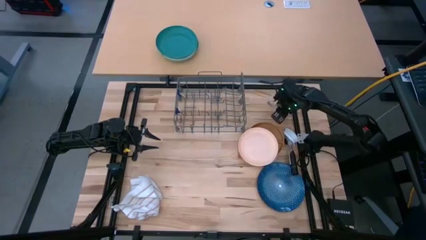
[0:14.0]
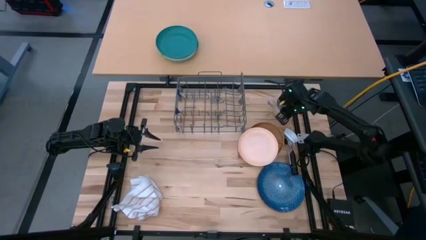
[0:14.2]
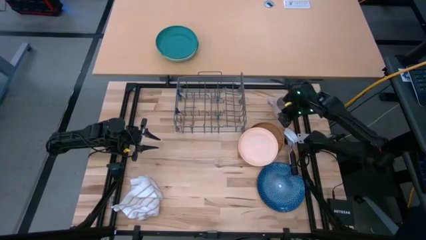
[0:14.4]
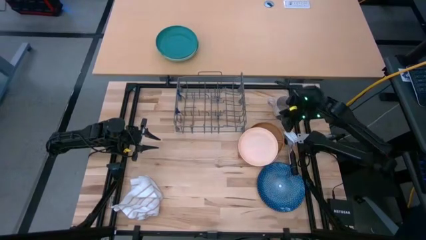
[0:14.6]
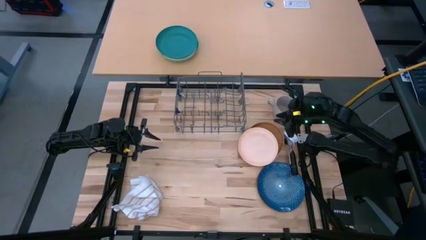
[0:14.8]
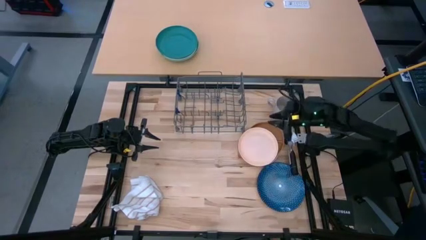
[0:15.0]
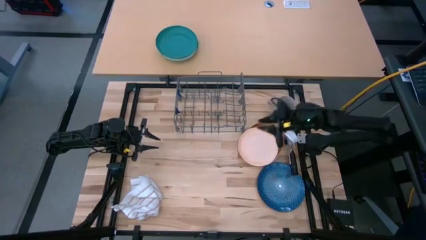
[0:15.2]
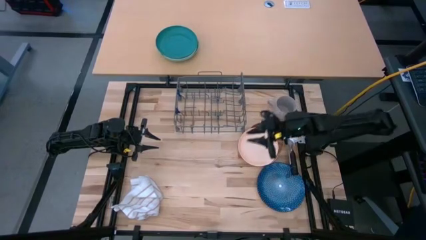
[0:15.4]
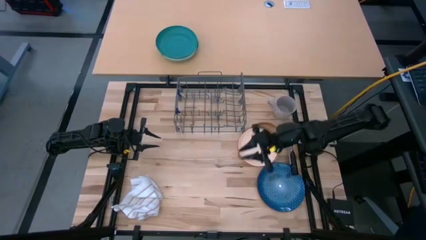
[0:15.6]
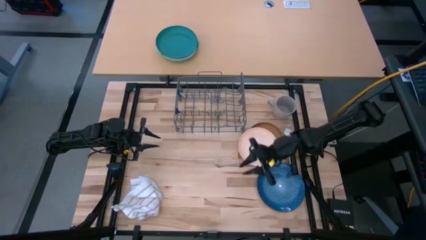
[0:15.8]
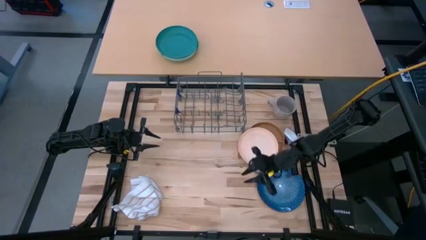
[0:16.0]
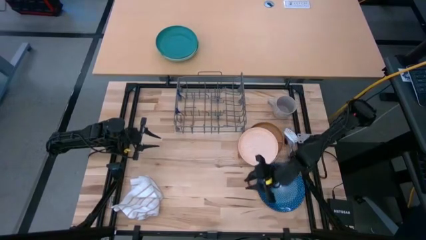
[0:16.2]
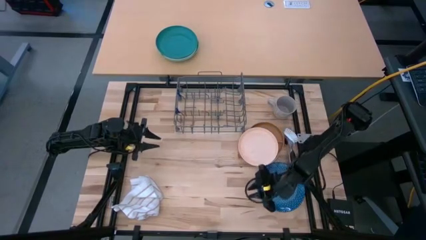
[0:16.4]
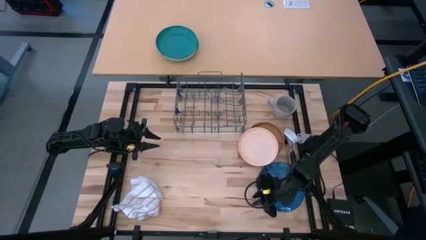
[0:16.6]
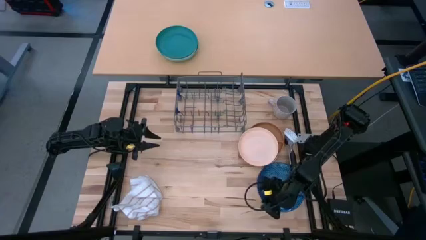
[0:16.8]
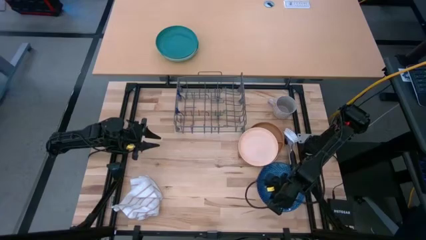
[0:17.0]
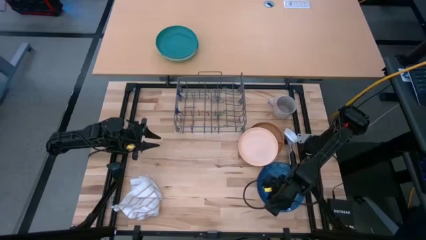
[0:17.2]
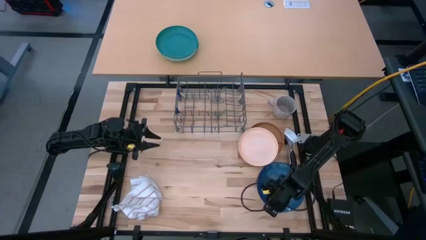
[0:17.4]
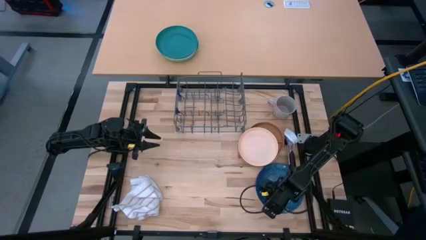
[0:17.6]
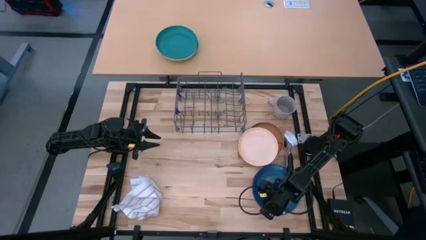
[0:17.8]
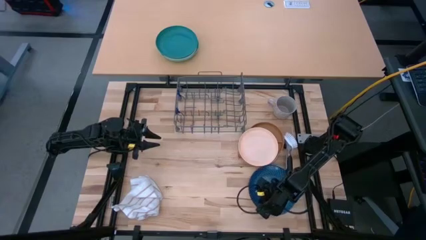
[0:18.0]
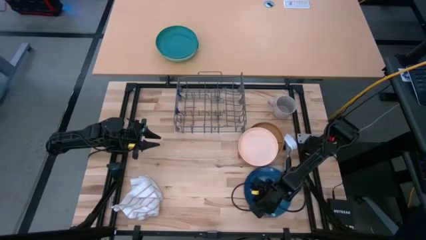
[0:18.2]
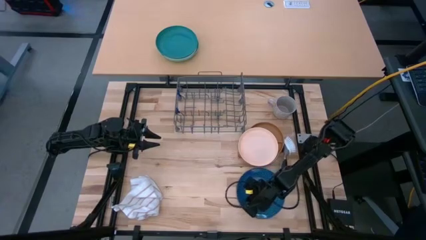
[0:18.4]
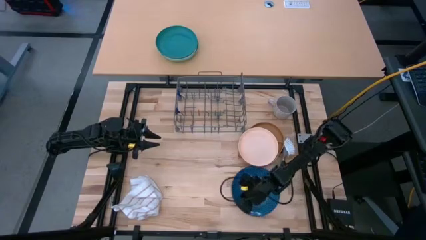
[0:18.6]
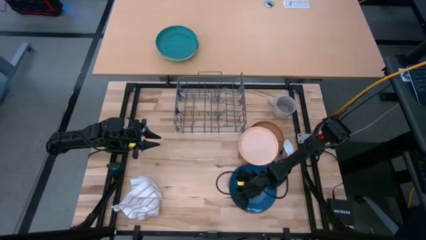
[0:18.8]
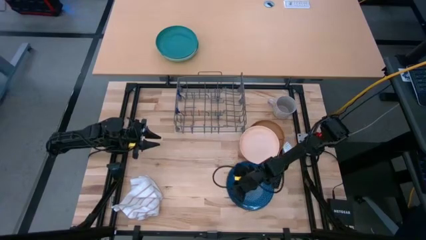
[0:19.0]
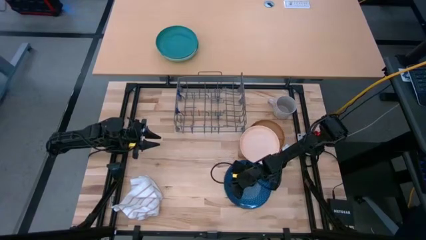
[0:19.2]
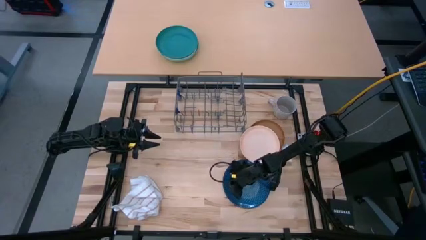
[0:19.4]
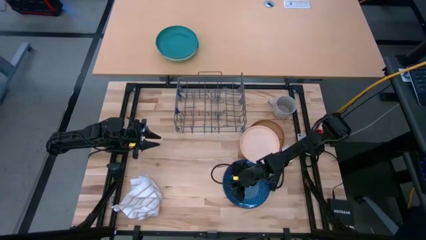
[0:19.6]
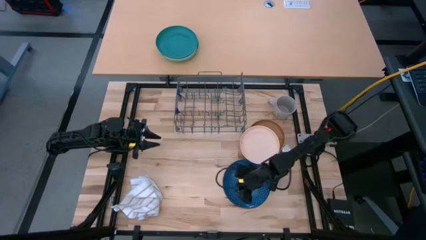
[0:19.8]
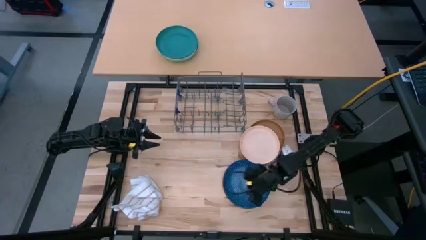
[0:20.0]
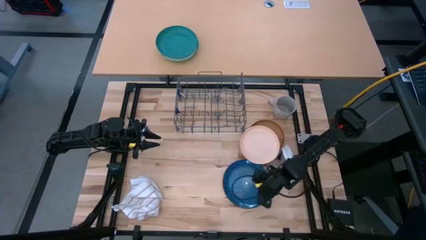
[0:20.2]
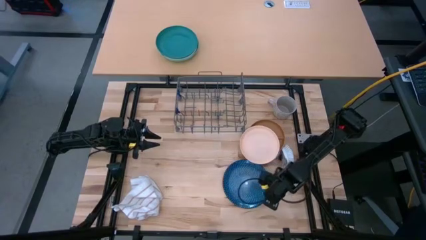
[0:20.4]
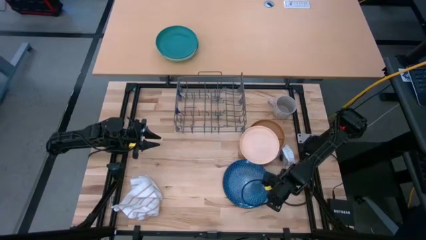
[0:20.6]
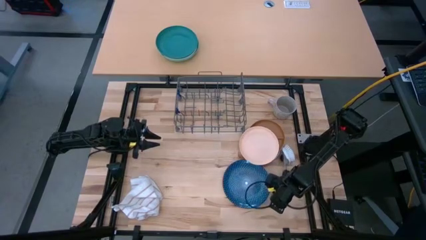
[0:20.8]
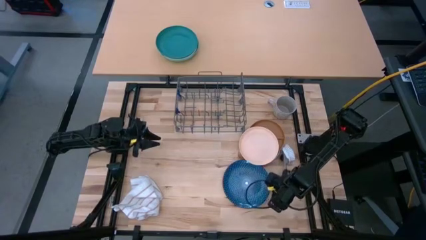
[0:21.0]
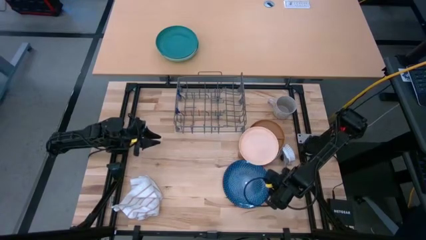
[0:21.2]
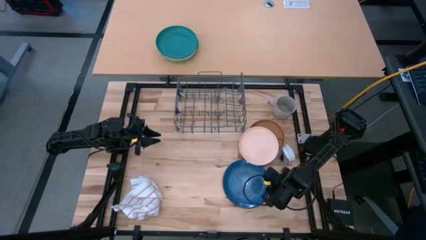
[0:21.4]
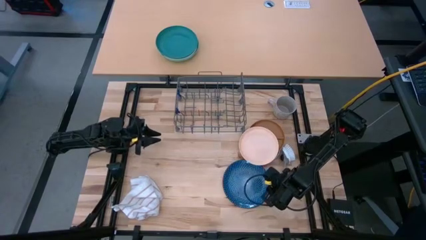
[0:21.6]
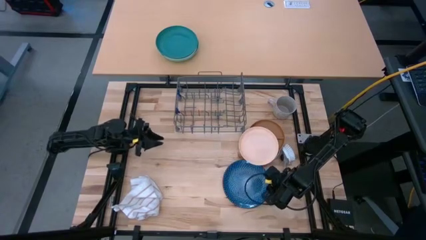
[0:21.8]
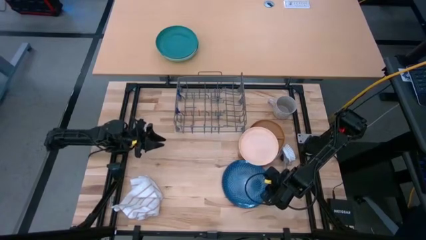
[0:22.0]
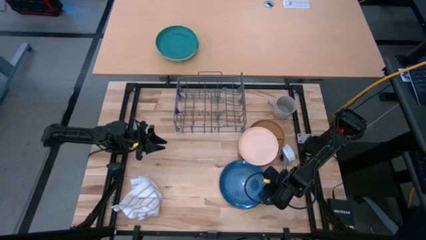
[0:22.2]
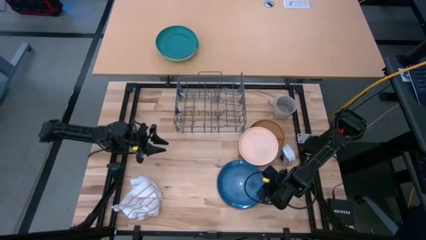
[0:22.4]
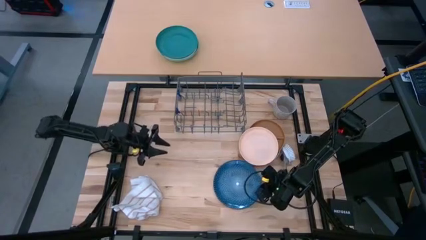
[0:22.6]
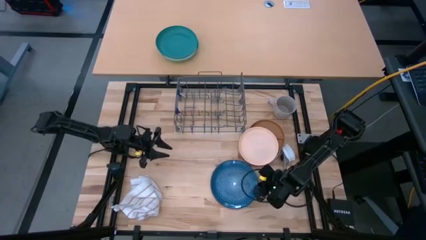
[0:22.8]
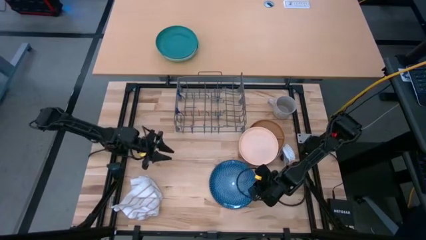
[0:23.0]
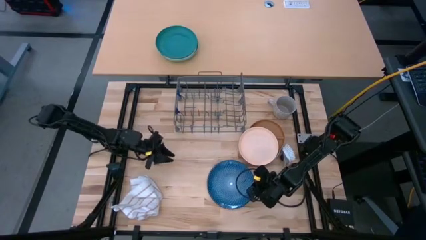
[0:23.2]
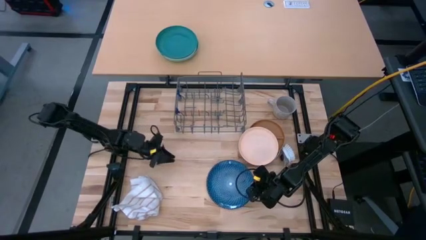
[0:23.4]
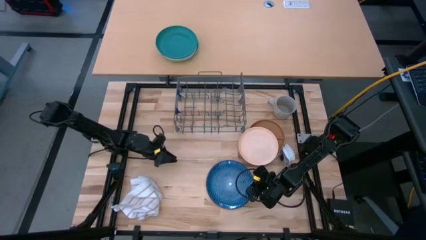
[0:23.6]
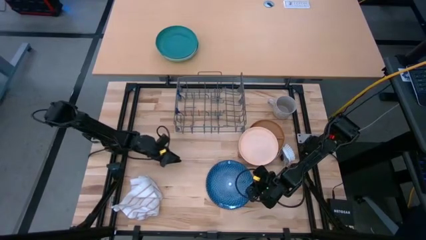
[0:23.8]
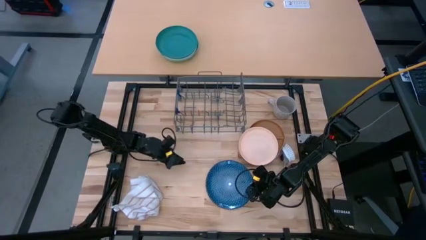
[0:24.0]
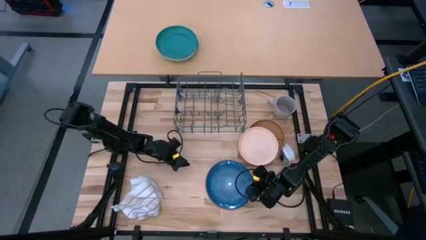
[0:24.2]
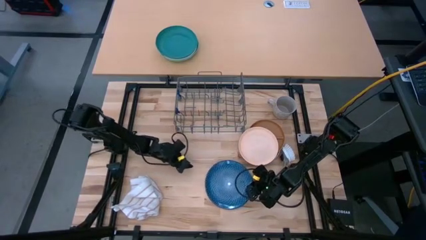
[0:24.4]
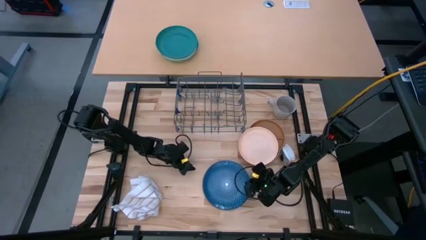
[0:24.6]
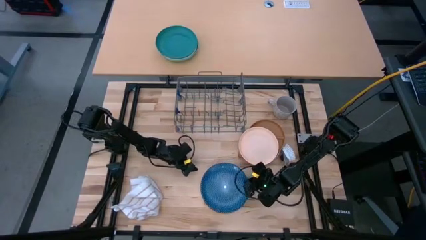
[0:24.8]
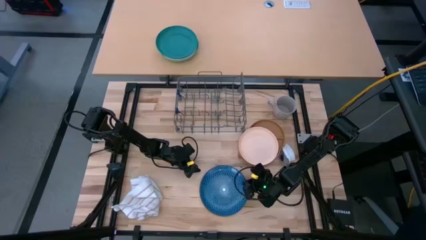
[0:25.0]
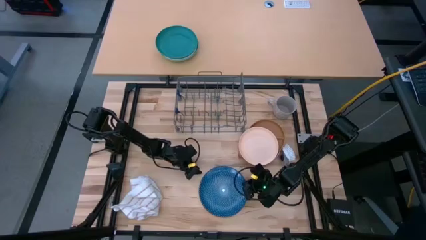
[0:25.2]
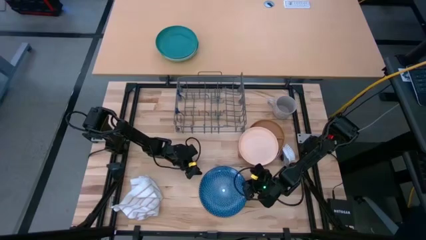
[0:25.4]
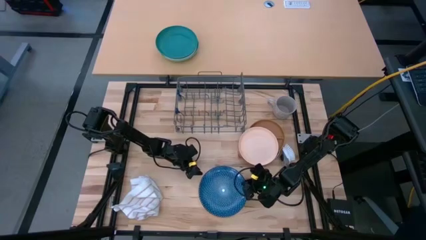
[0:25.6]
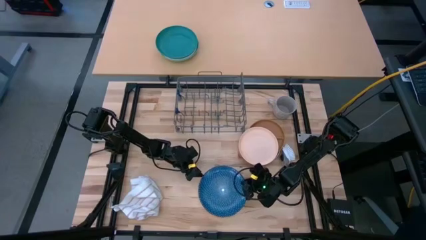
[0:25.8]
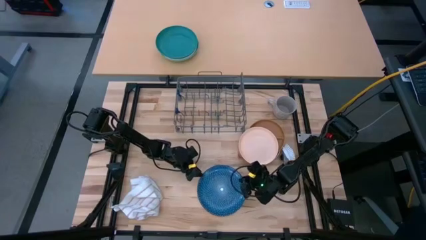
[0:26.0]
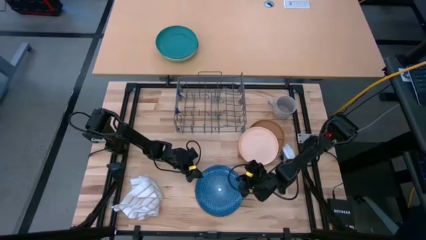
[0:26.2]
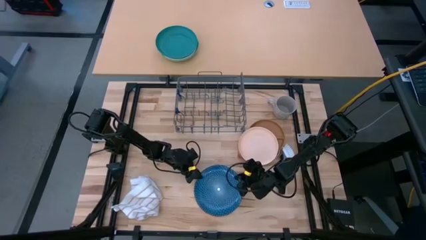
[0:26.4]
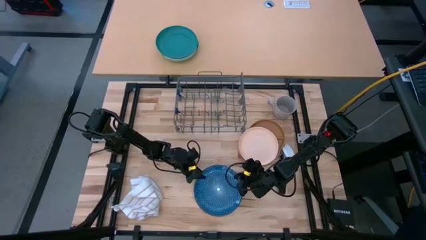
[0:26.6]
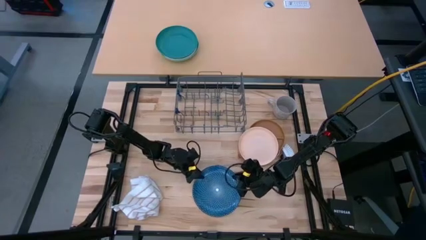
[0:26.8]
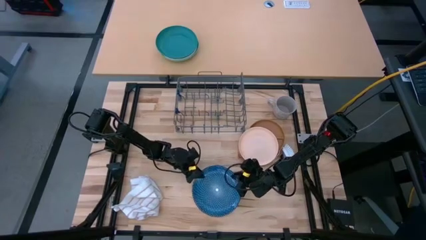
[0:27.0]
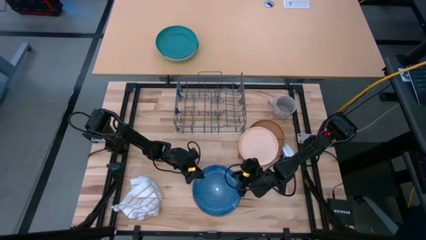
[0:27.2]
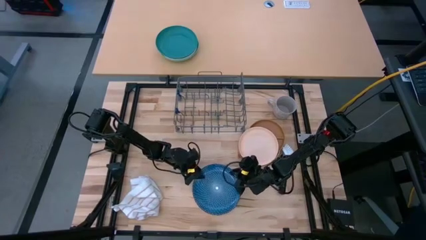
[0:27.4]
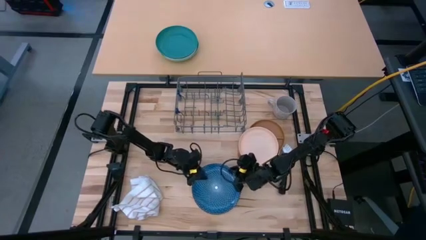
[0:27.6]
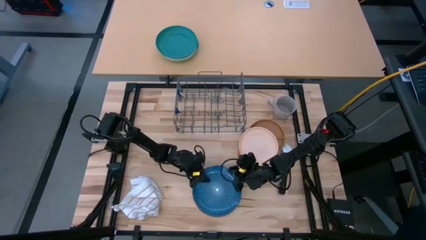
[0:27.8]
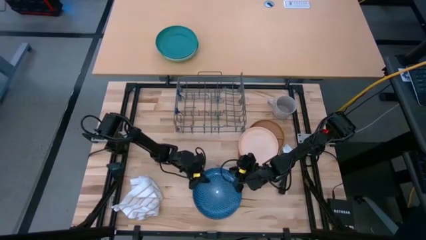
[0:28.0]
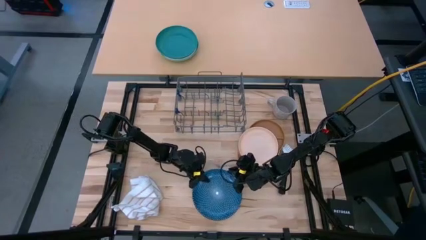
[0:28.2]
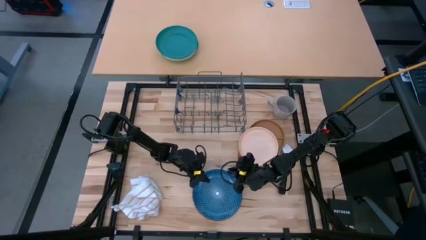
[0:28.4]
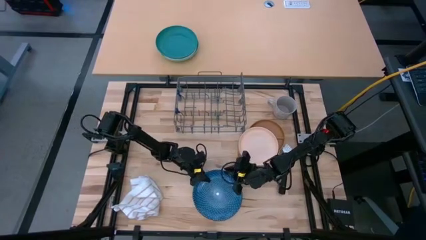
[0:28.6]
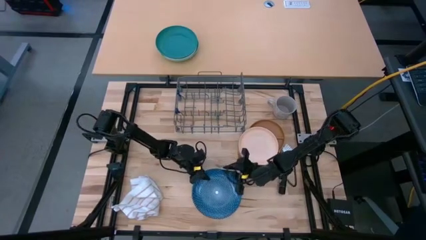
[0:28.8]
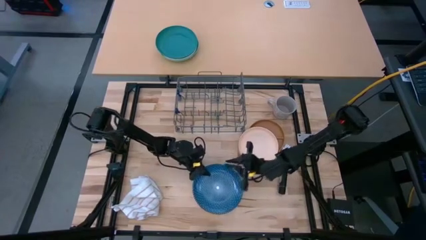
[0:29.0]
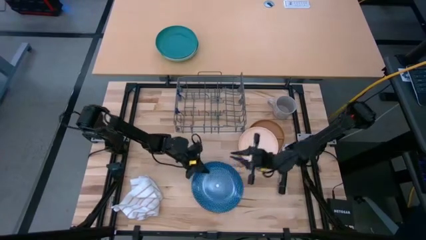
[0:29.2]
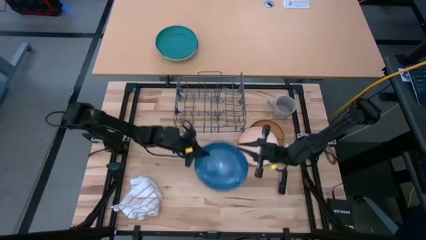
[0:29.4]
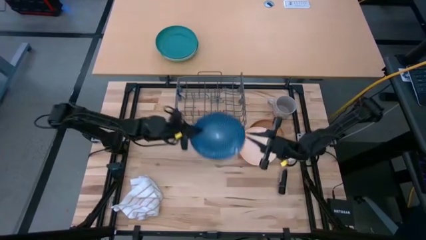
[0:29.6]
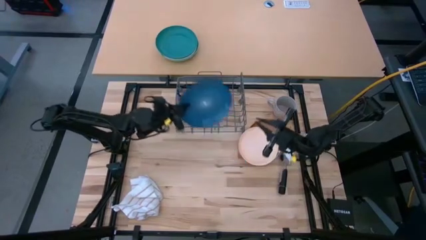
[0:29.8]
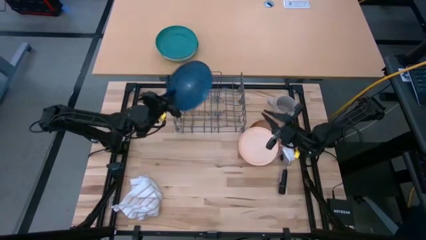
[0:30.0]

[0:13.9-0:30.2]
Task: Sort dishes
Put the blue plate in the dish rack
